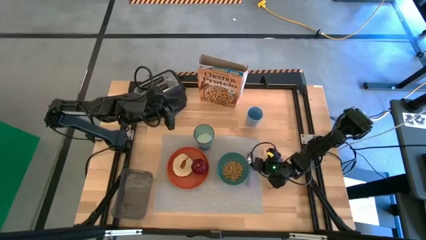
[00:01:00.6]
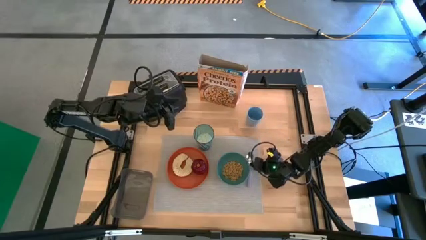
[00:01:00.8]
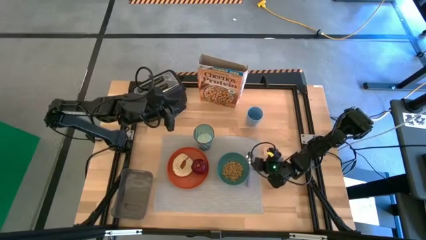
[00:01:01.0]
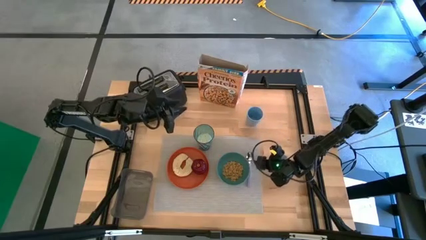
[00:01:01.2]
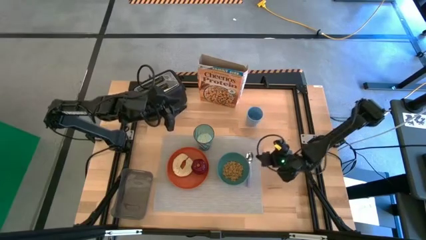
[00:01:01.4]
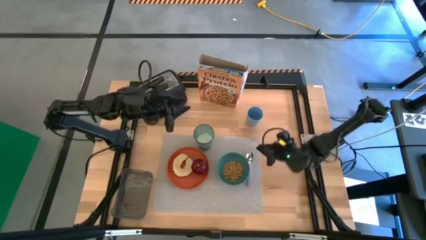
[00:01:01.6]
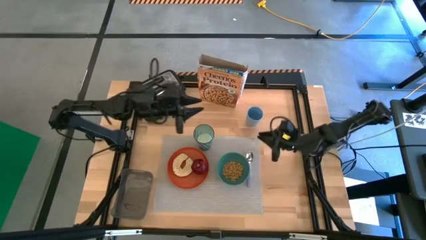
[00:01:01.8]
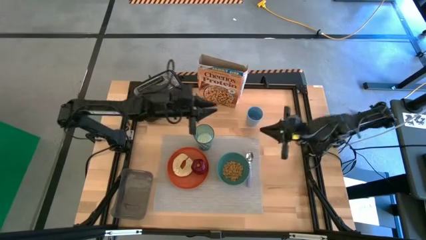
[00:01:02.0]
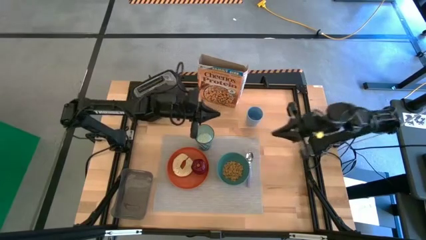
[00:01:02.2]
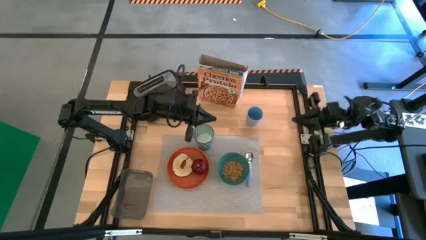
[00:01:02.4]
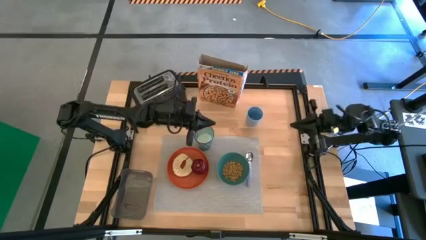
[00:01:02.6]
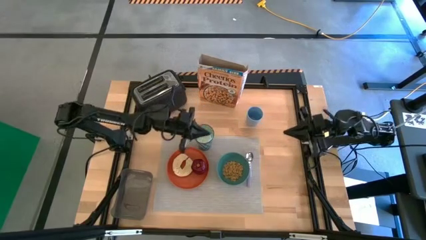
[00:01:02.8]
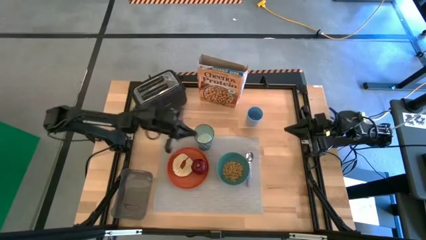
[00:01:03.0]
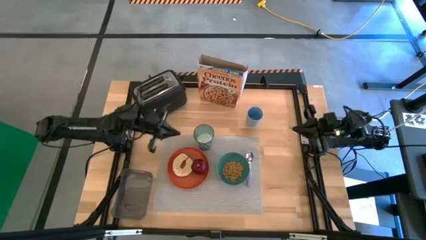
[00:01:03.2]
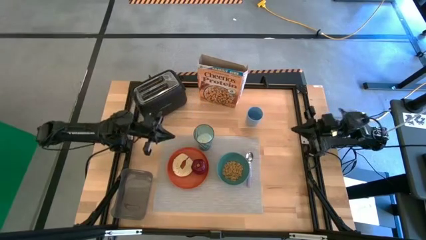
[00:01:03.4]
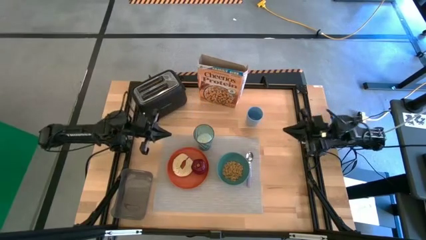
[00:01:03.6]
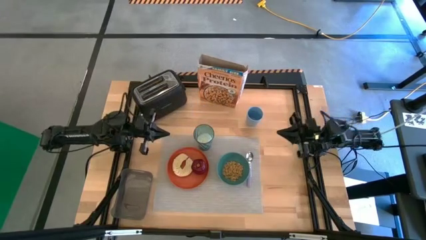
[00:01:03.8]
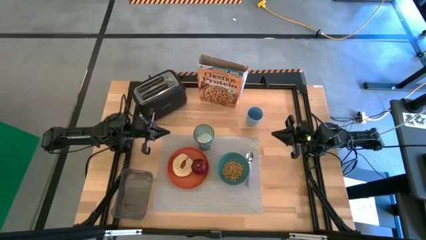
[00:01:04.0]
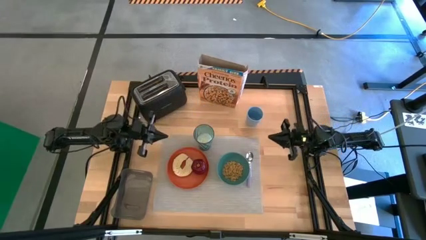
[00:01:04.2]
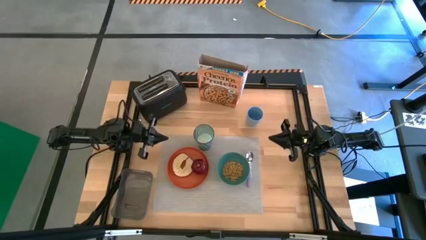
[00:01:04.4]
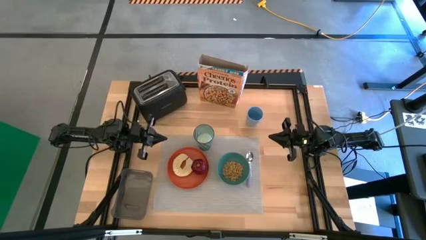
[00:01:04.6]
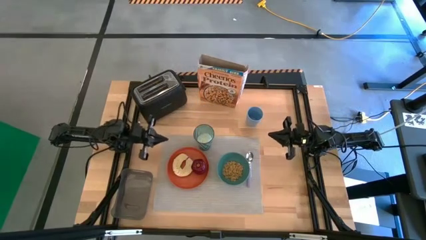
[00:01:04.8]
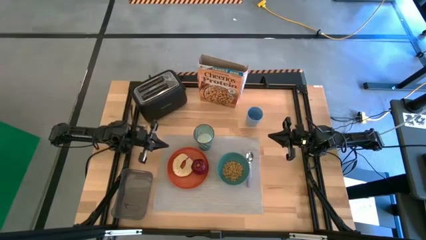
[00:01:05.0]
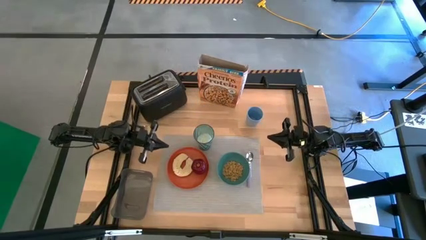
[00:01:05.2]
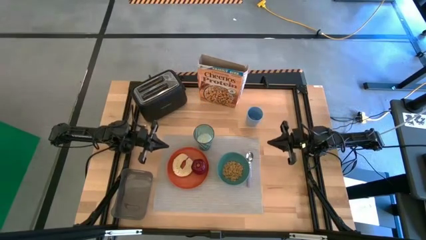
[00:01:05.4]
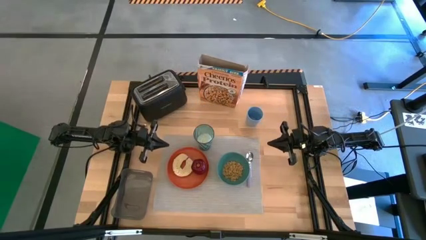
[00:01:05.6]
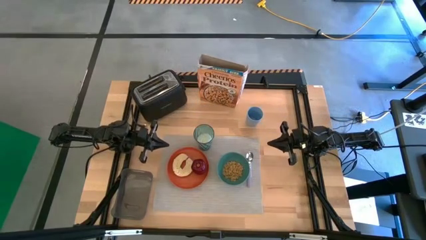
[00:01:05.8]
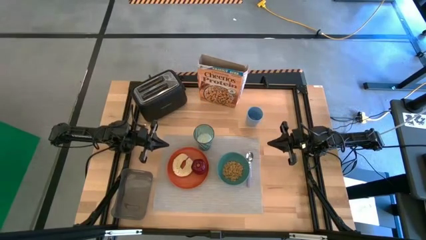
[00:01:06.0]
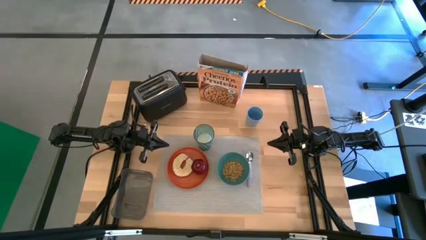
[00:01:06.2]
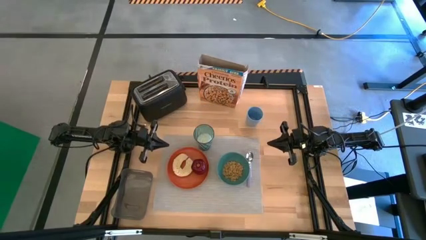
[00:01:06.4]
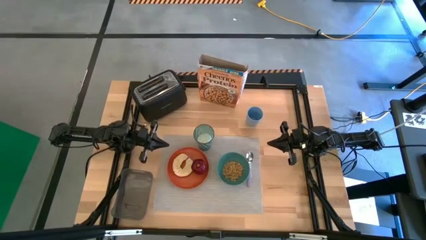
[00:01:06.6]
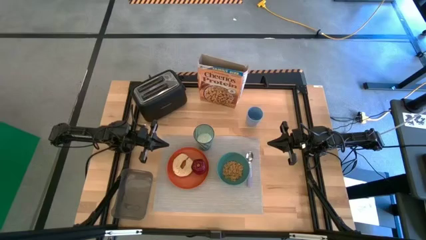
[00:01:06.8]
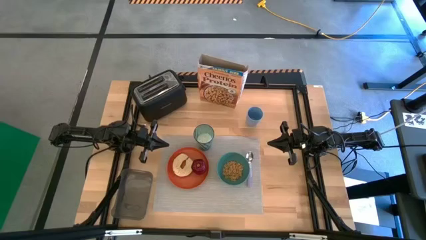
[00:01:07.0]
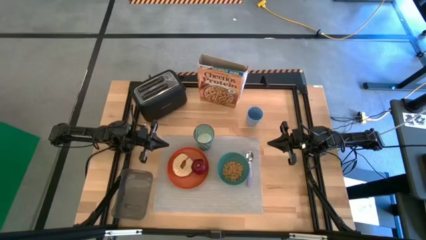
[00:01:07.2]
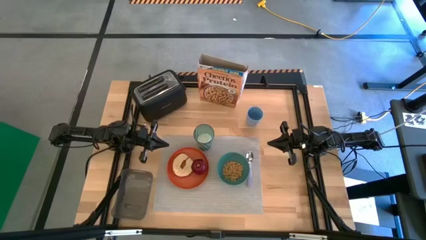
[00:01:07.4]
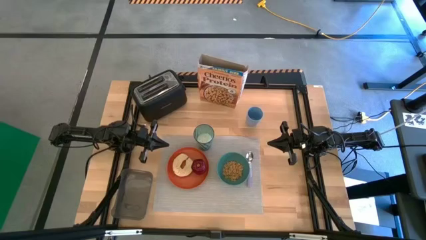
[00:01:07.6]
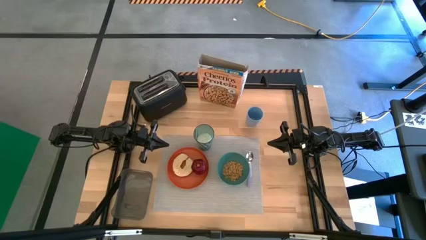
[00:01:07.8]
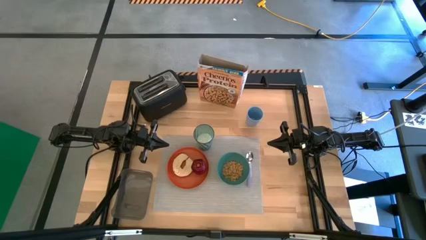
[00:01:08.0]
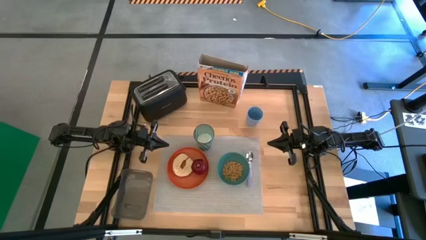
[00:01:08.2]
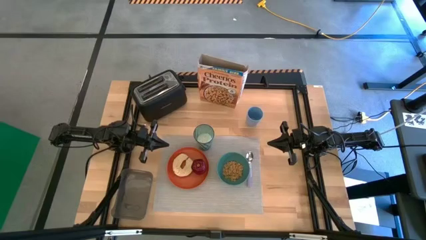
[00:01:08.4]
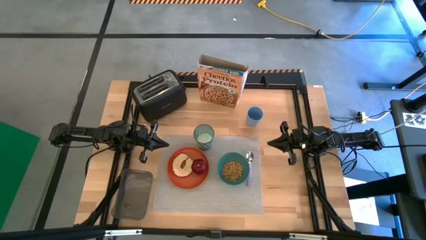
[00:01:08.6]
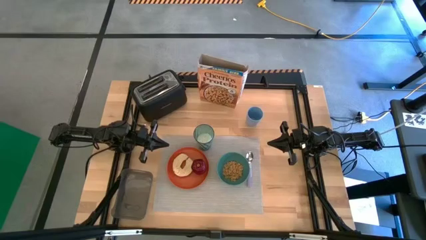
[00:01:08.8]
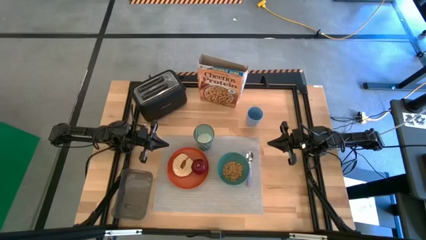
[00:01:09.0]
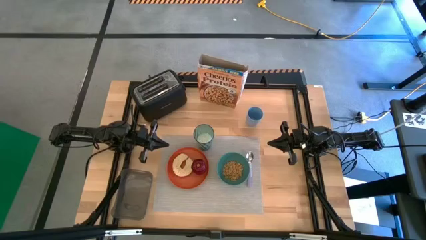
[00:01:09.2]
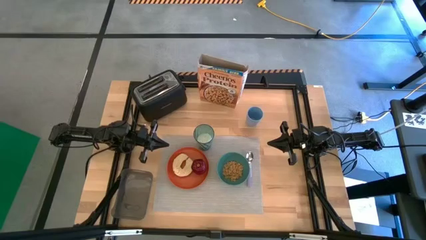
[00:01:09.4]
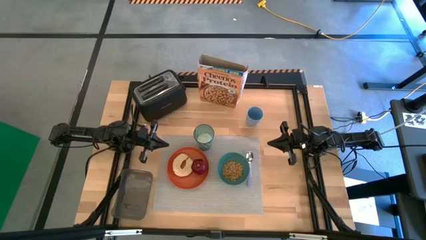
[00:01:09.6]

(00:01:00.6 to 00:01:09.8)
Task: Arrange a breakfast setting
Return to Home Position

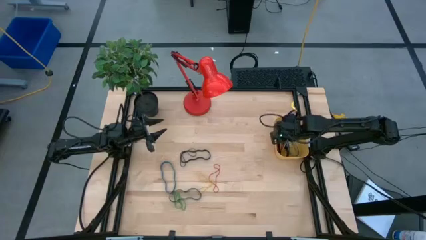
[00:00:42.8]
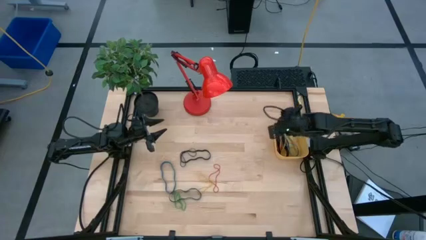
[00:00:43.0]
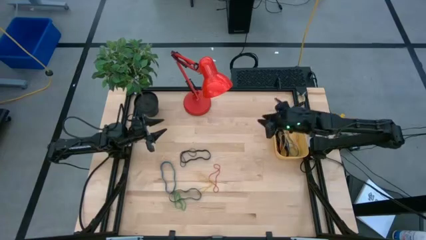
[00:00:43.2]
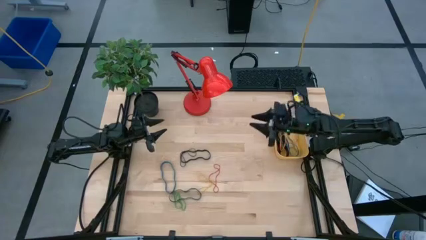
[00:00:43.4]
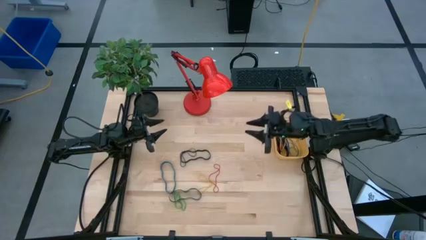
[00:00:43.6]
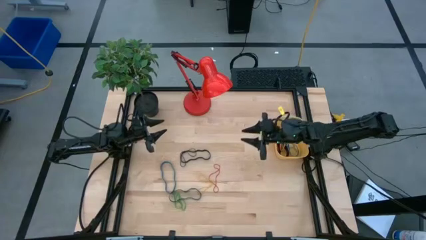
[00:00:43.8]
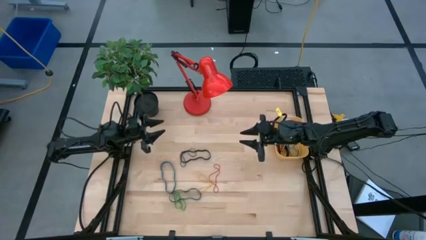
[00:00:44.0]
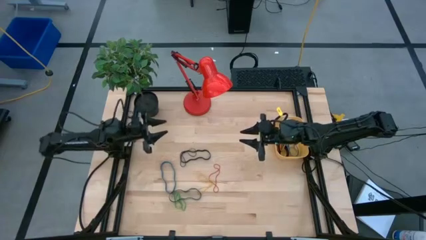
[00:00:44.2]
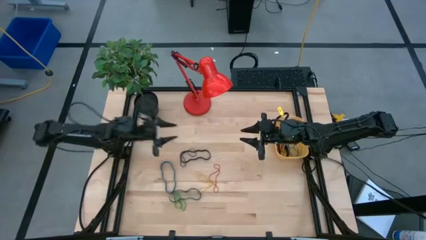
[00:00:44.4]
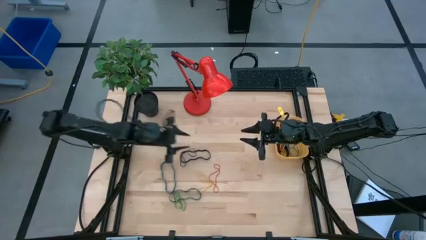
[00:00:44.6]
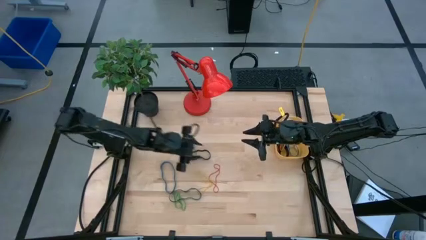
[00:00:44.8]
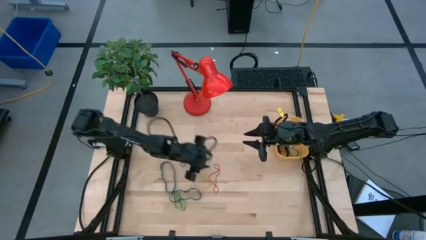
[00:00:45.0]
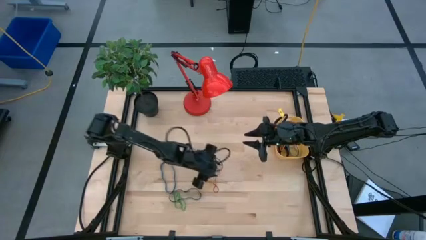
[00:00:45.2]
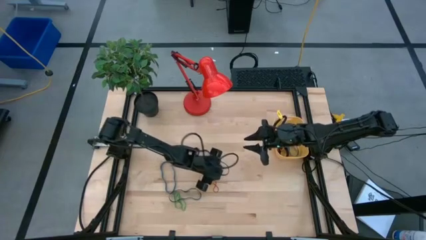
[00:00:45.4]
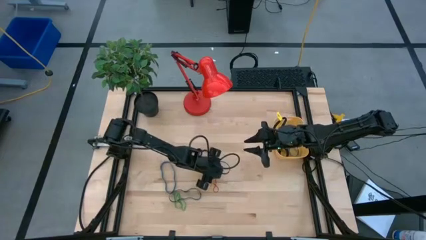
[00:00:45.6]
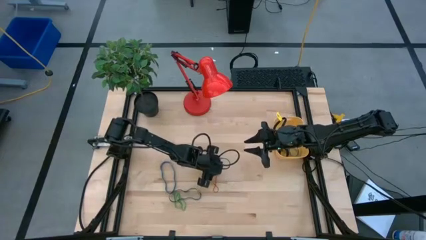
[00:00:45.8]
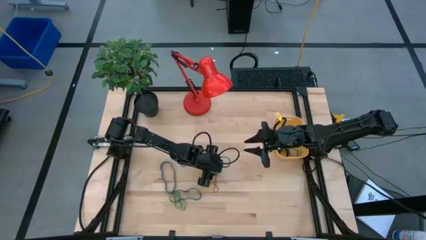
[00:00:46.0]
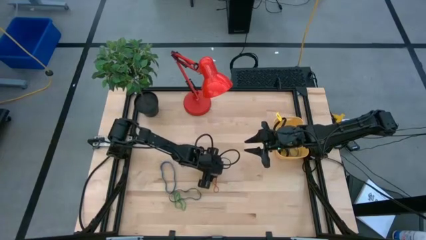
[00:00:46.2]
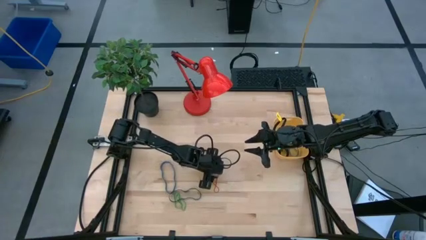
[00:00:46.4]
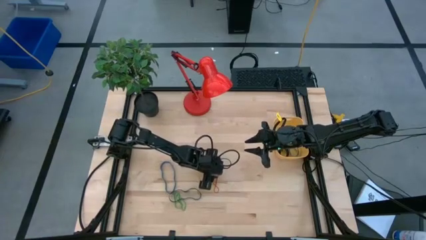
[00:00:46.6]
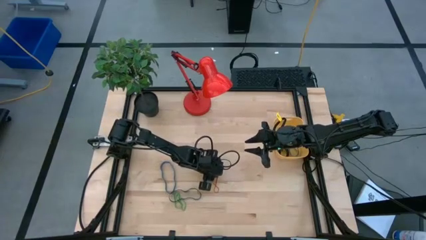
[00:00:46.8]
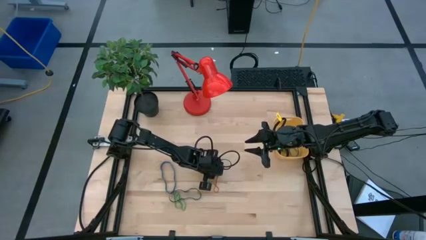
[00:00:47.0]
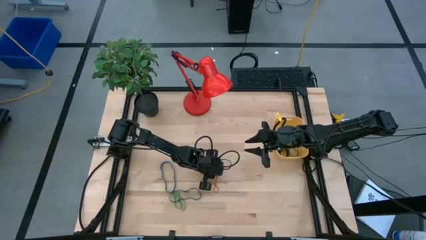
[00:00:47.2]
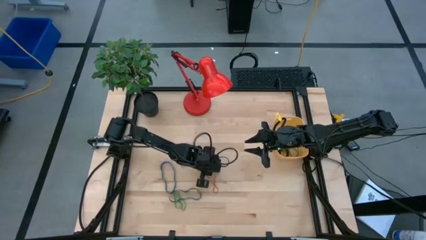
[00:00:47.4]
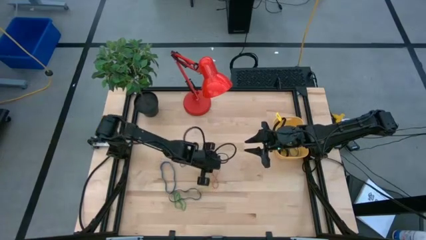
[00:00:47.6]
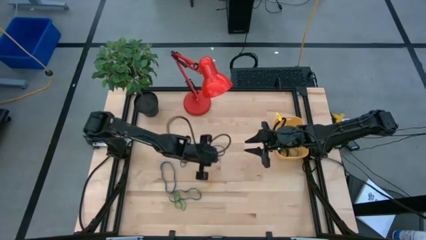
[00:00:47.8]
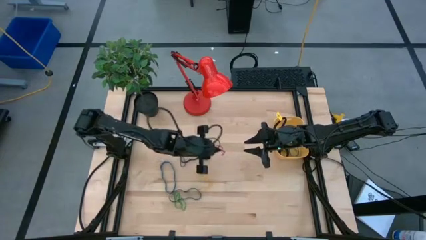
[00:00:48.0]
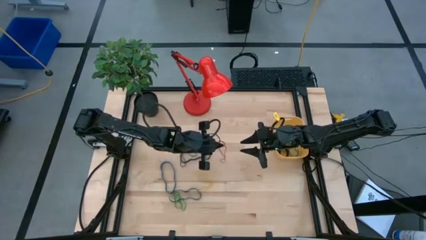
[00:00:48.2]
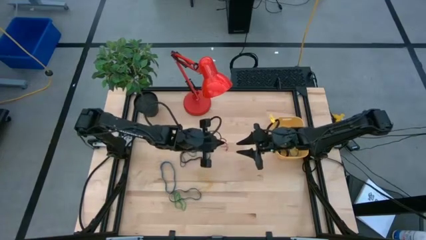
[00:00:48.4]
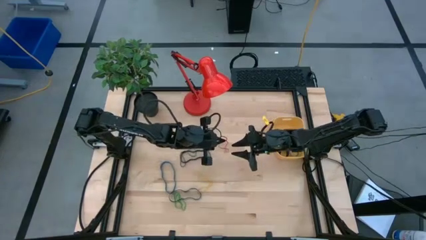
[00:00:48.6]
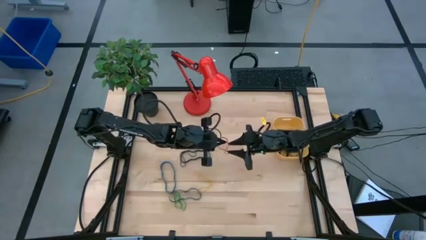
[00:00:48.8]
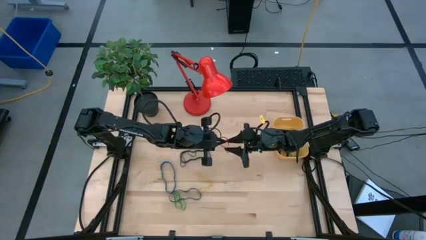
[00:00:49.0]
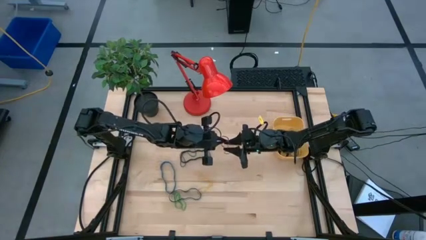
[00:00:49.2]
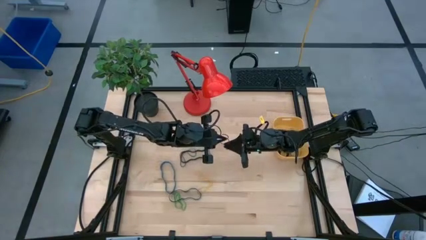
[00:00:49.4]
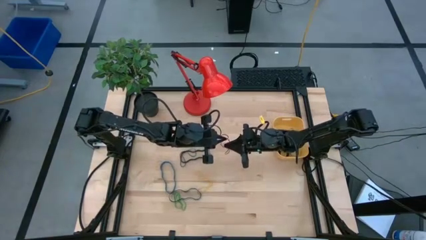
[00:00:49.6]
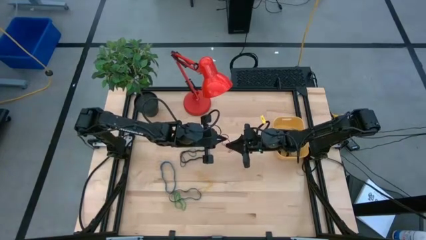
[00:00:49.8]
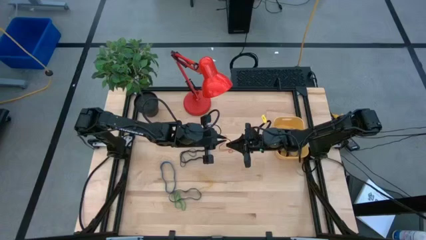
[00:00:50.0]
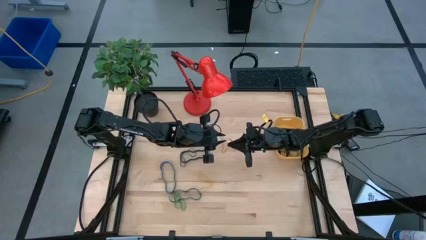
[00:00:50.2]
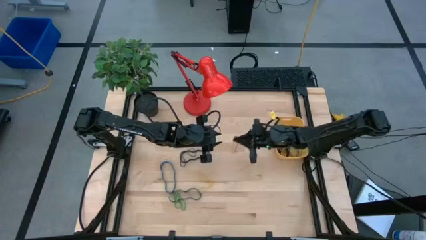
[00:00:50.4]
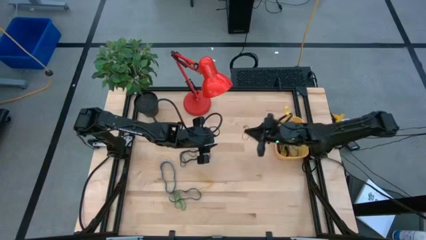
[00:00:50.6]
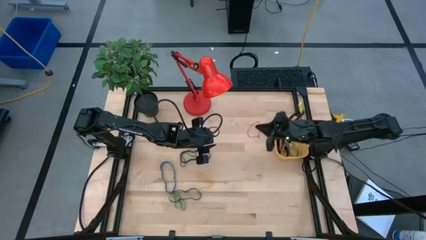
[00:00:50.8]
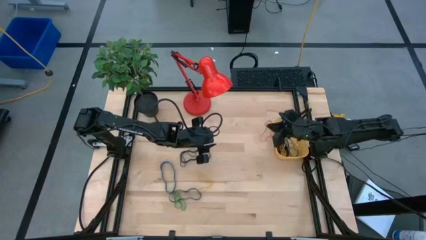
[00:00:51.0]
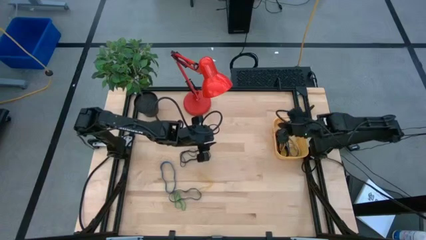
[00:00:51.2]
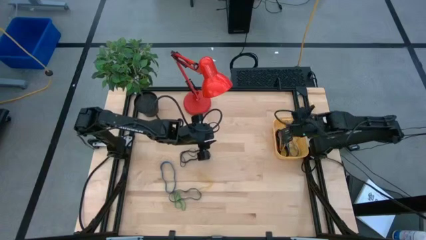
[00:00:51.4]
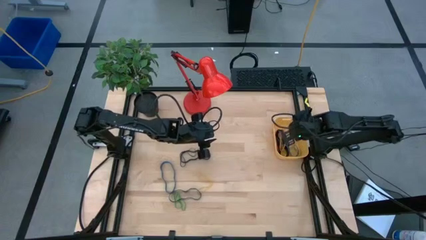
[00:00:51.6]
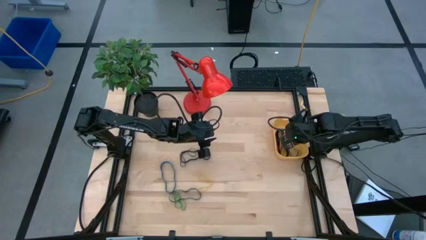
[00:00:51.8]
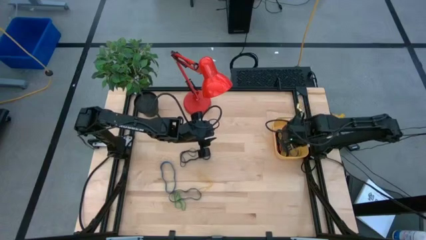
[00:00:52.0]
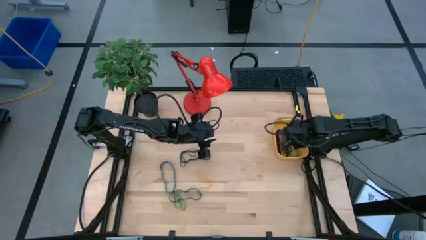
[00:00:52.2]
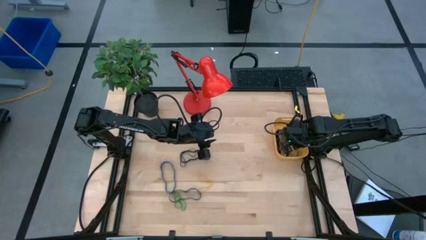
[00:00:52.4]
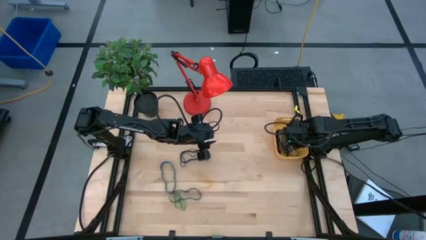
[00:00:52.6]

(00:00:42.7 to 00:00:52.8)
Task: Pick and place rubber bands into bin
Put the red rubber band into the yellow bin
